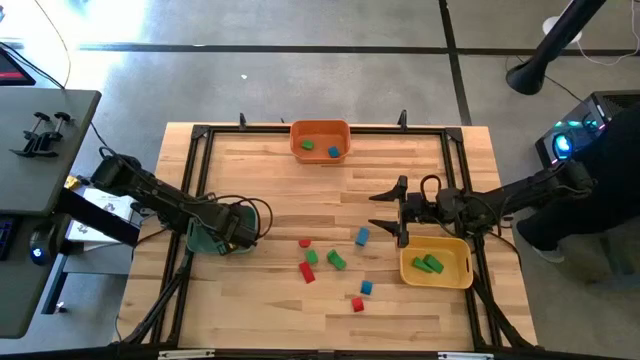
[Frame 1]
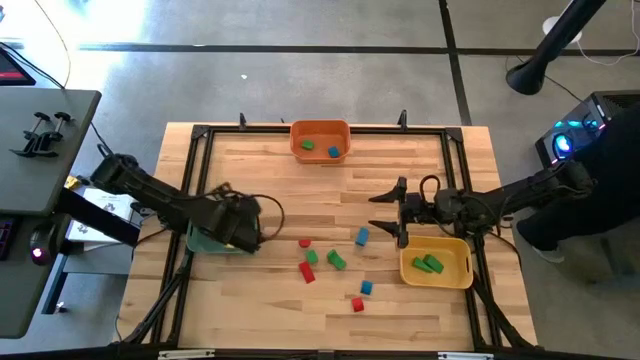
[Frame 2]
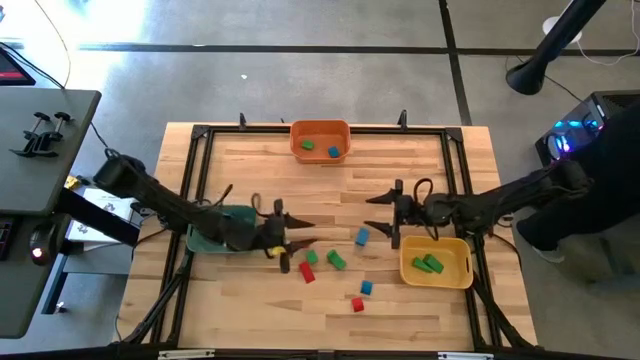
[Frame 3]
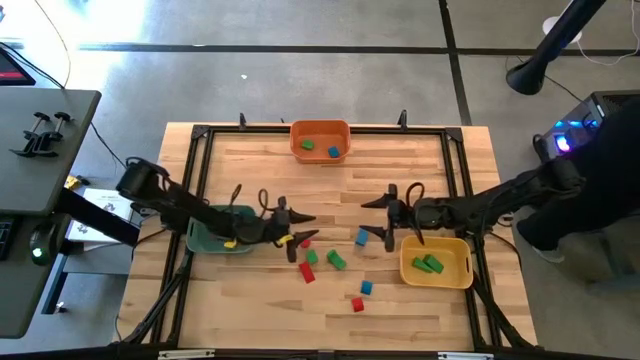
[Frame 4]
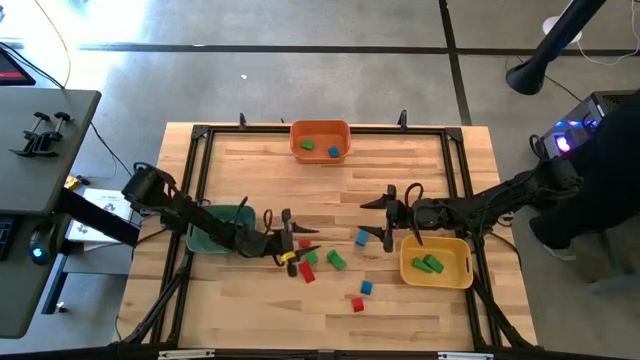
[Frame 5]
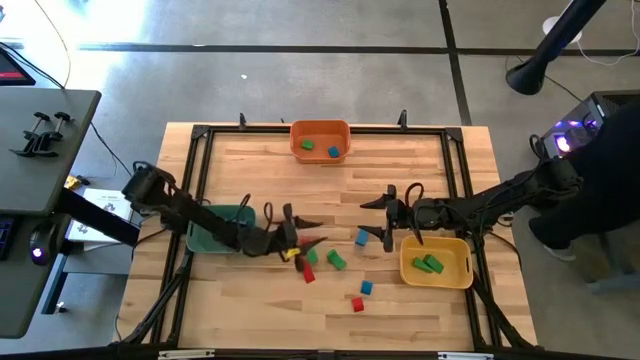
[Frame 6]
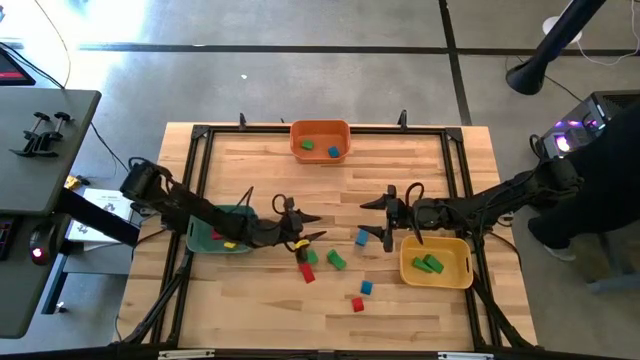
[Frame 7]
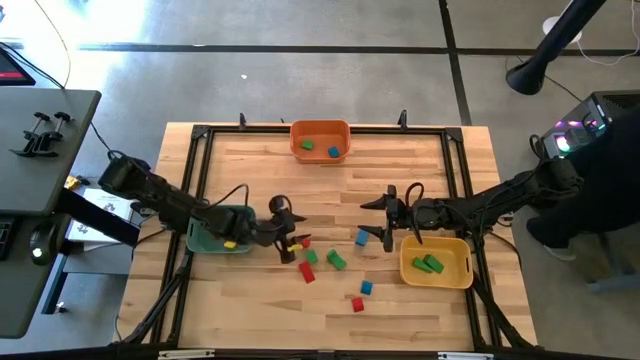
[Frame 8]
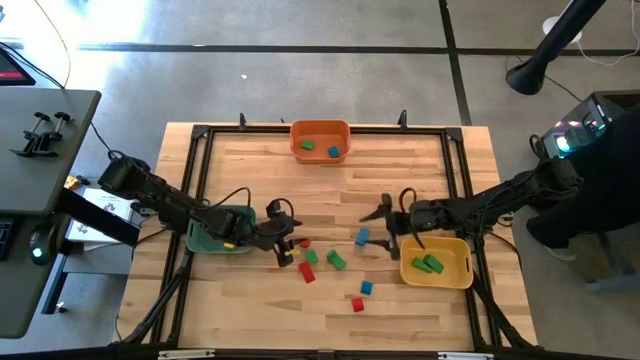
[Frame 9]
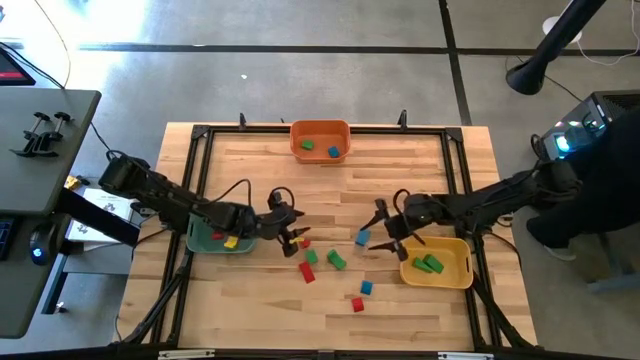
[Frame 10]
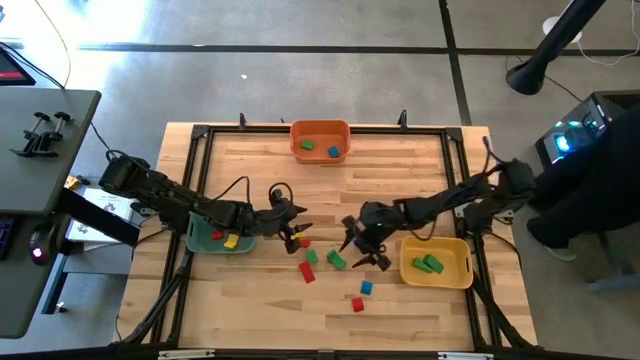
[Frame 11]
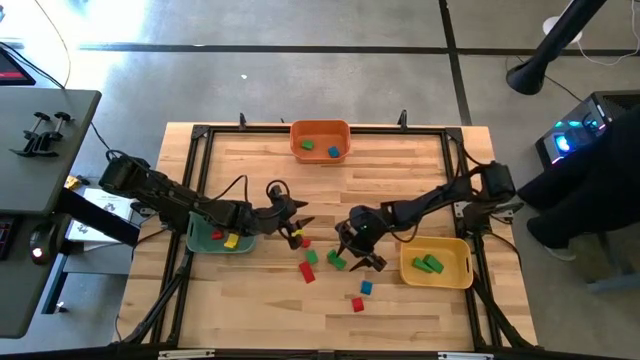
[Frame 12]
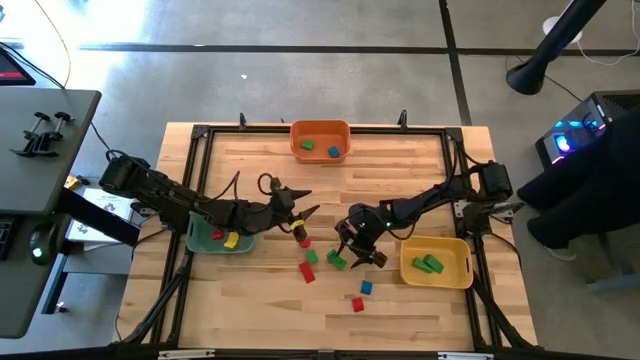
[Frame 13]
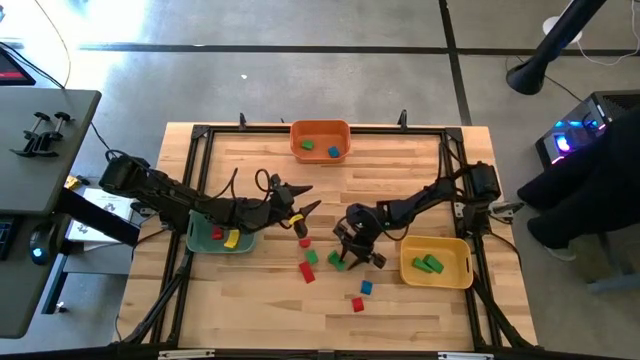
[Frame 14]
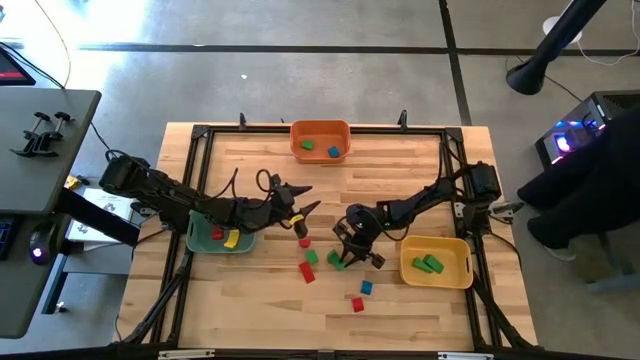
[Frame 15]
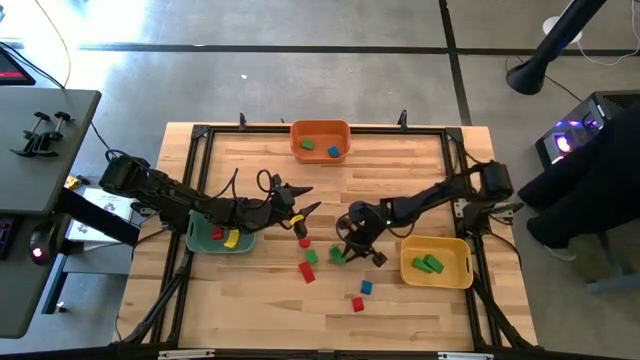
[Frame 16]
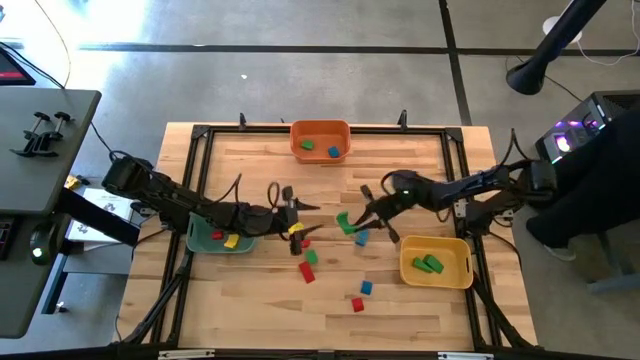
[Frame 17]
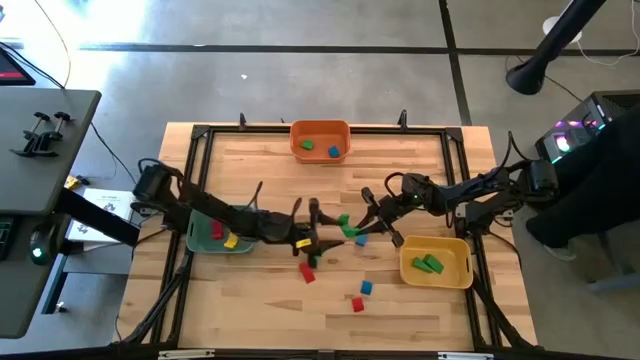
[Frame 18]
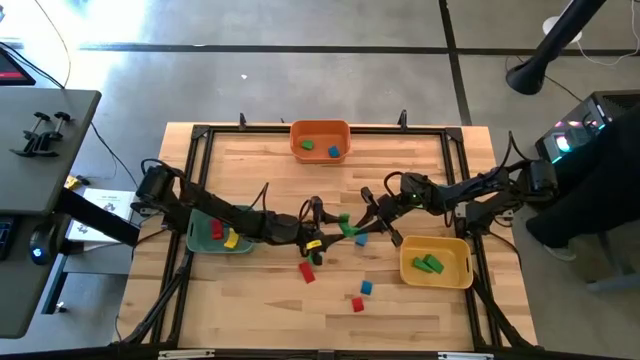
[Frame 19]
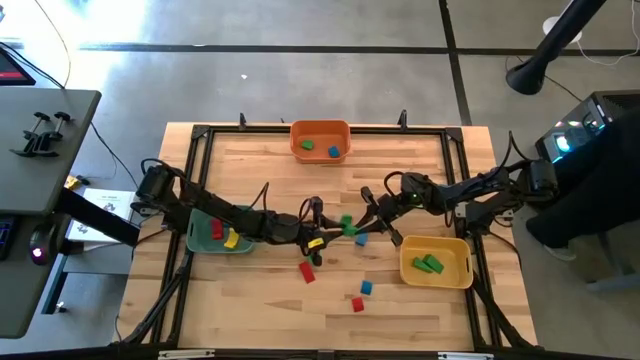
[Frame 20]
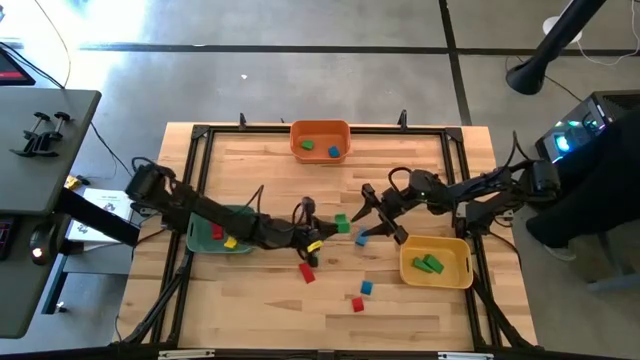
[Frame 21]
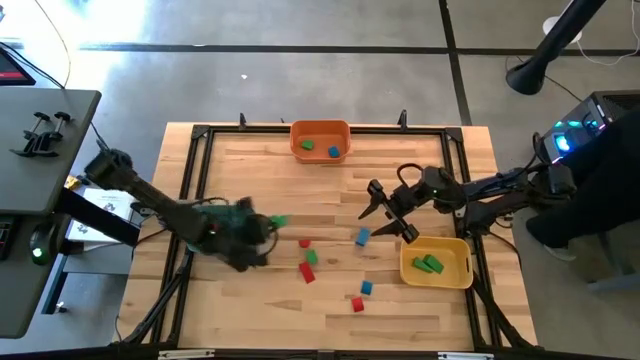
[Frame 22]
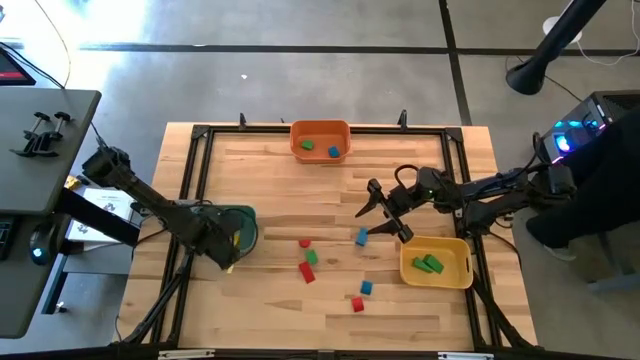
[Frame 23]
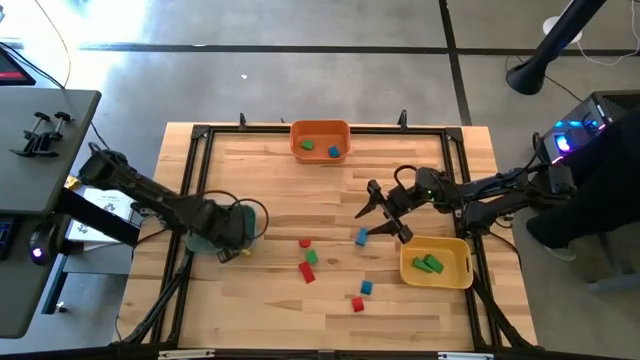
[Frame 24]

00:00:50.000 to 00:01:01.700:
Task: Sort blocks by size
Put the green arch block into the green bin

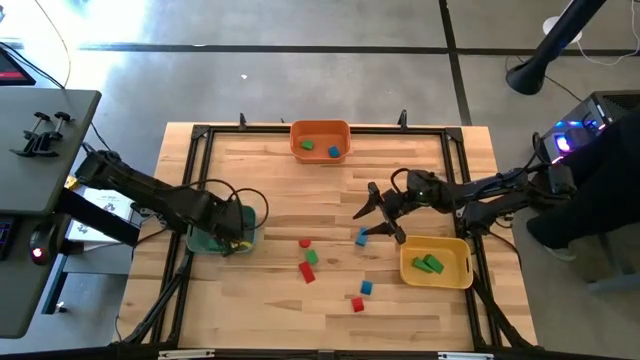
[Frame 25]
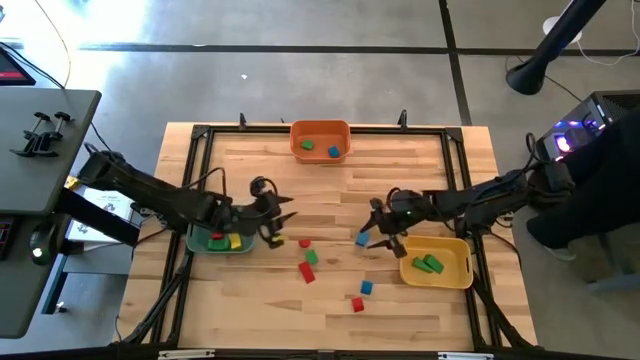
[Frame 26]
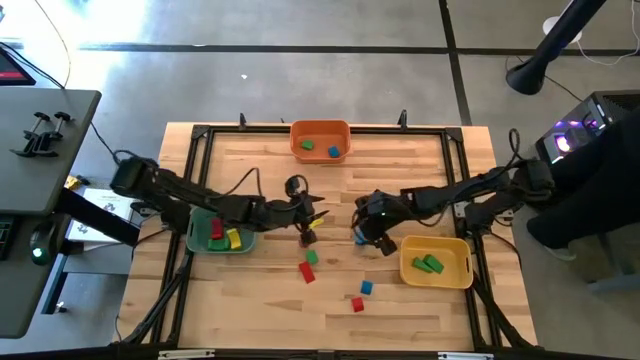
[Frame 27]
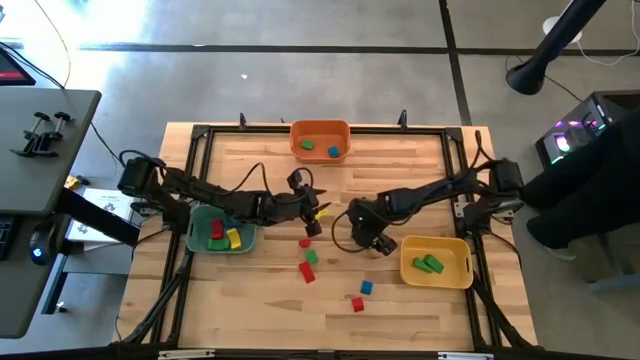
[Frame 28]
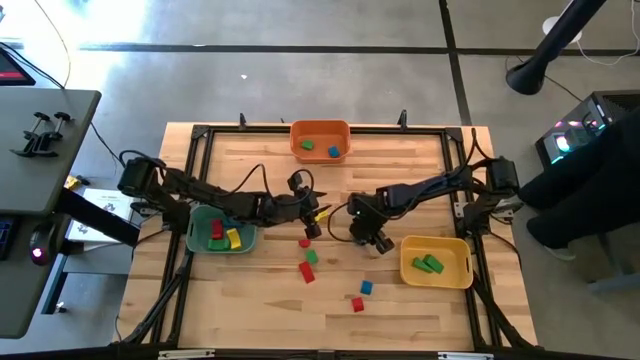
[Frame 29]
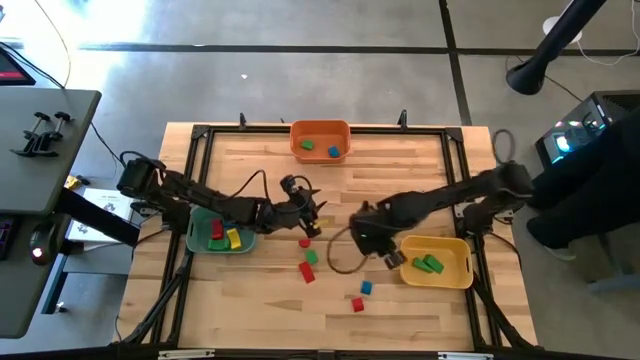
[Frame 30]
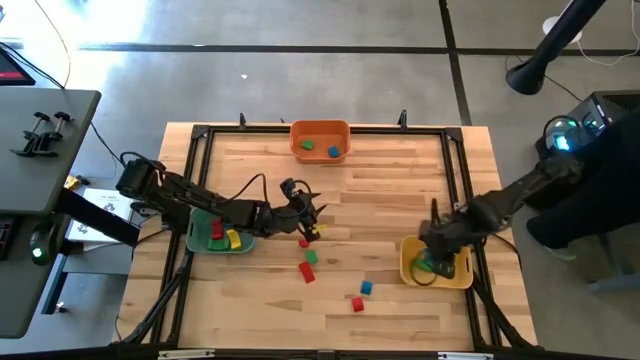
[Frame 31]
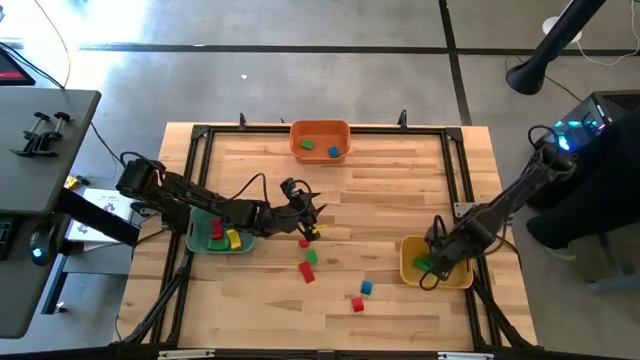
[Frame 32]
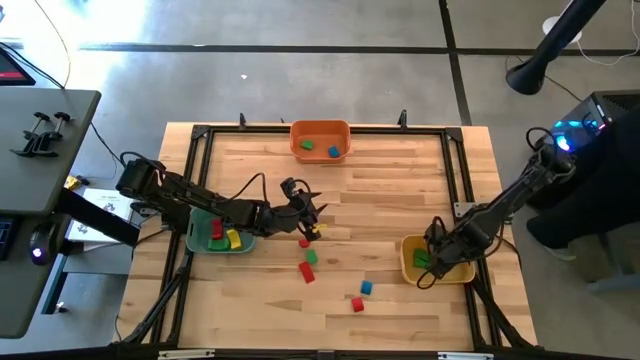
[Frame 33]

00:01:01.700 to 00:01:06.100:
Put the blue triangle block into the yellow bin

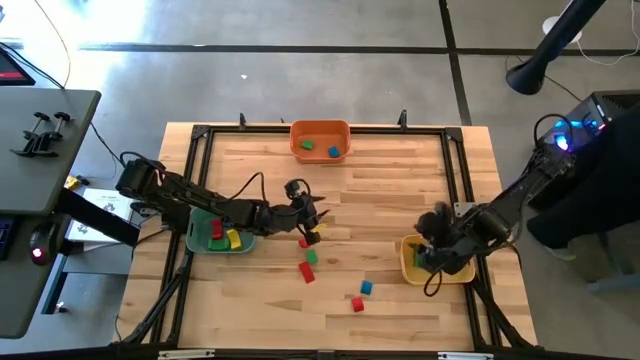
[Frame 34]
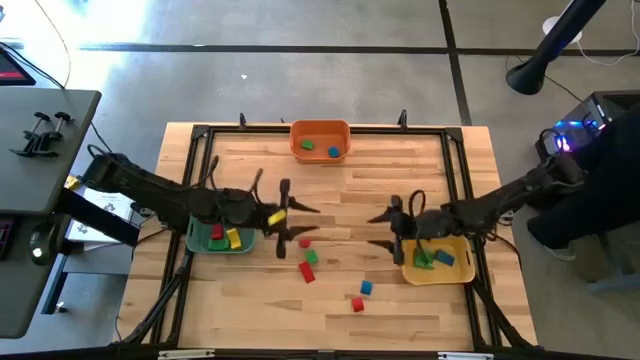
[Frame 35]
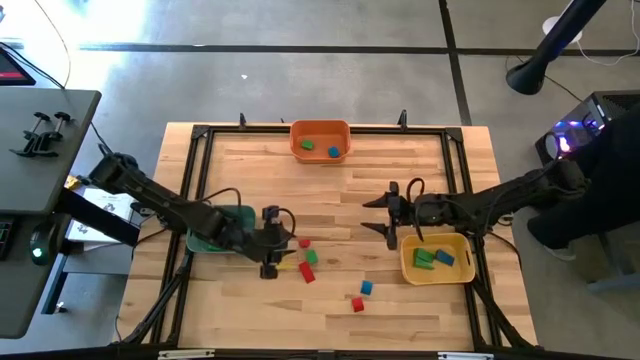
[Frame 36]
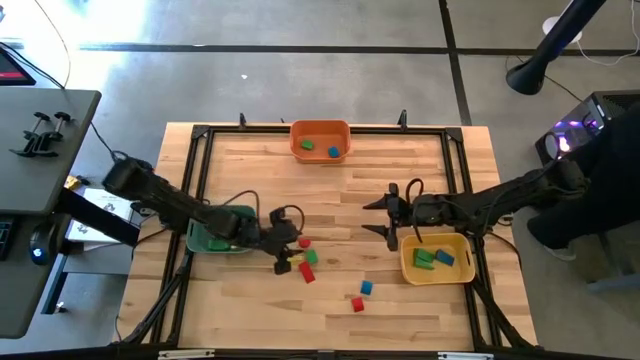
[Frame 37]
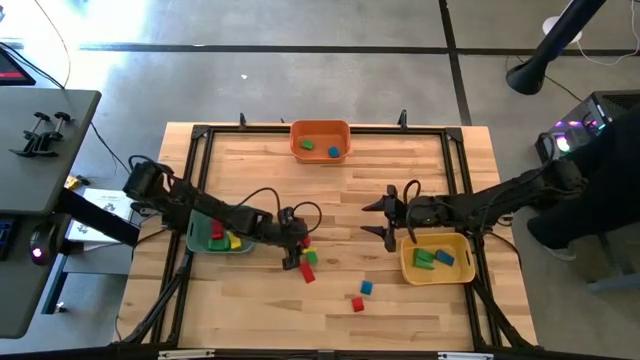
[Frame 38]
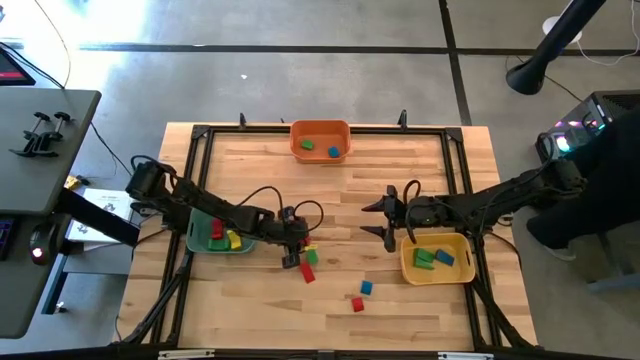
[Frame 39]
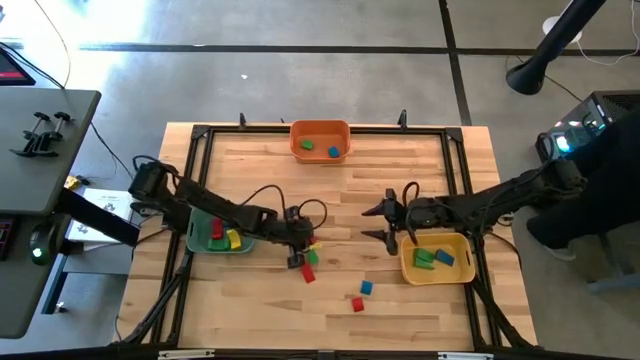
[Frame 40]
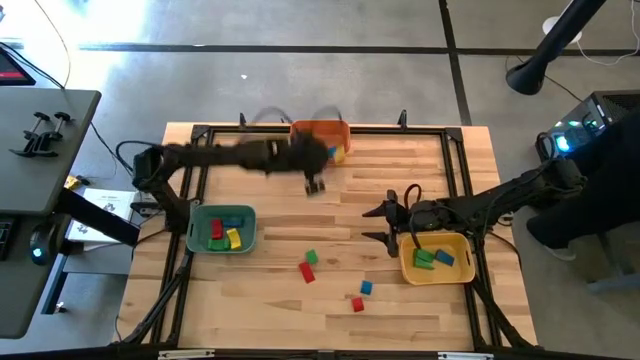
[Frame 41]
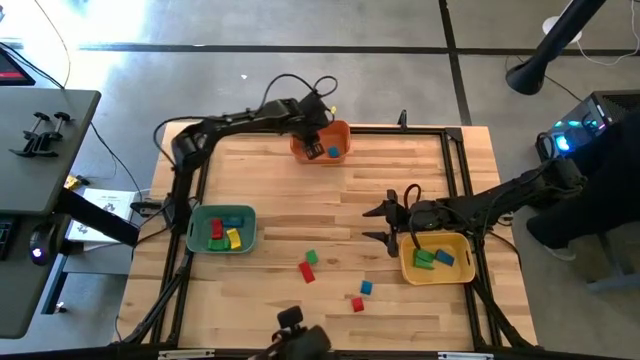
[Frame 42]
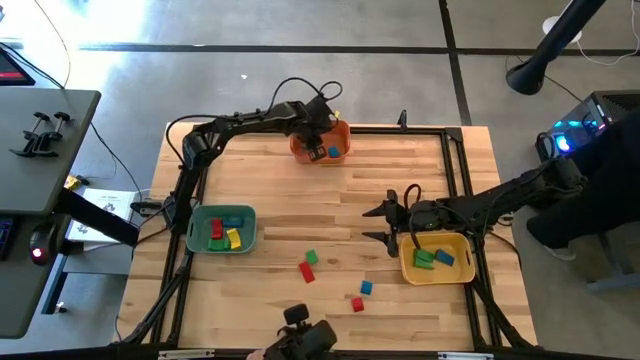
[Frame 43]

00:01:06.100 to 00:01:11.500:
Put the red half cylindrical block into the orange bin
